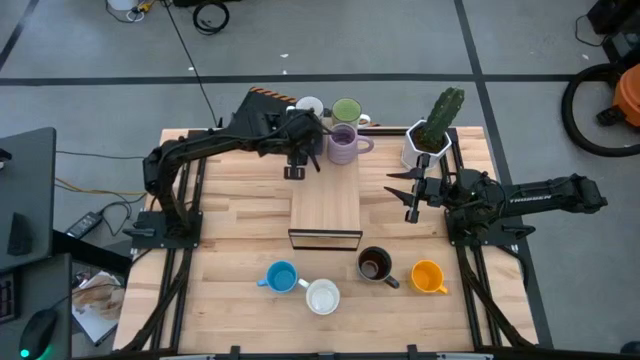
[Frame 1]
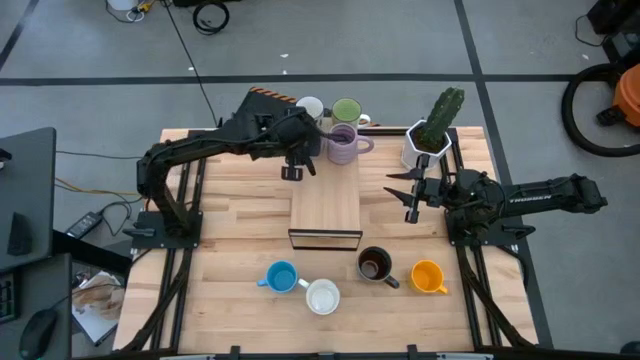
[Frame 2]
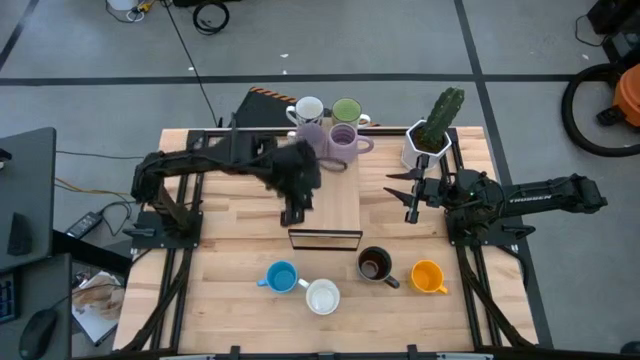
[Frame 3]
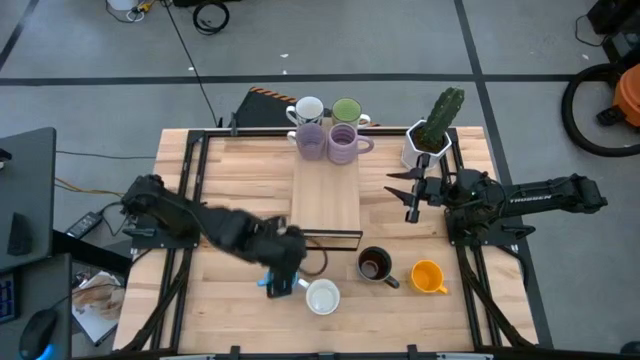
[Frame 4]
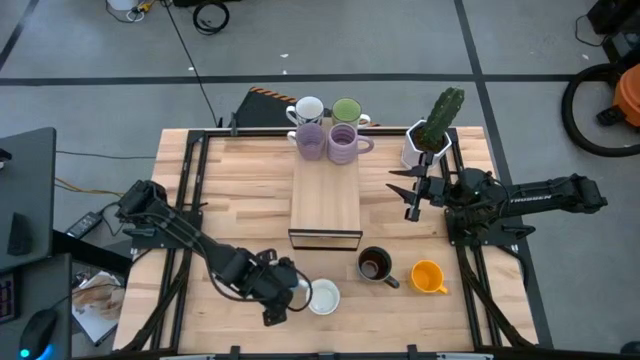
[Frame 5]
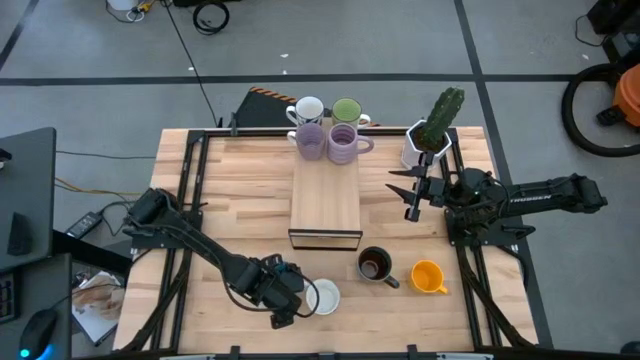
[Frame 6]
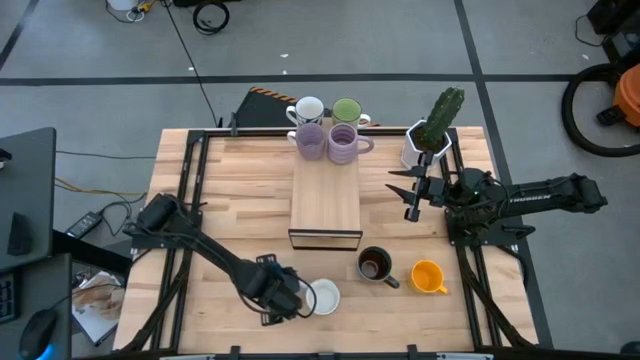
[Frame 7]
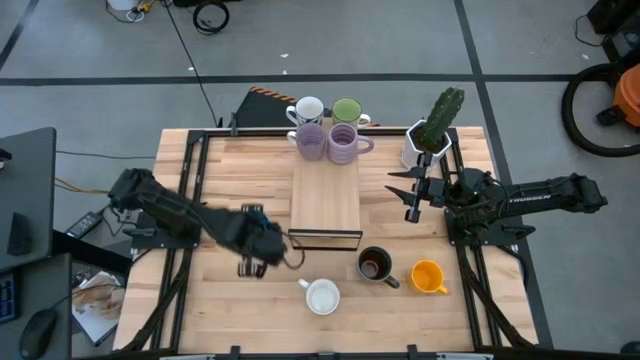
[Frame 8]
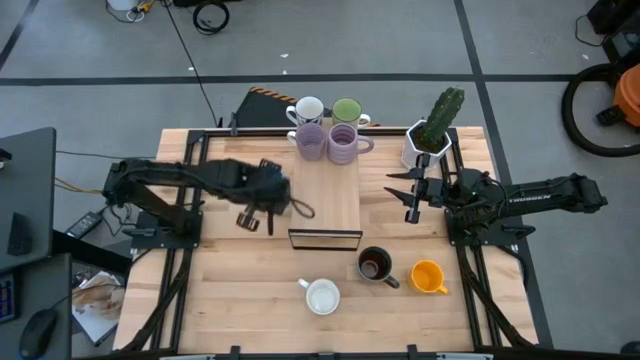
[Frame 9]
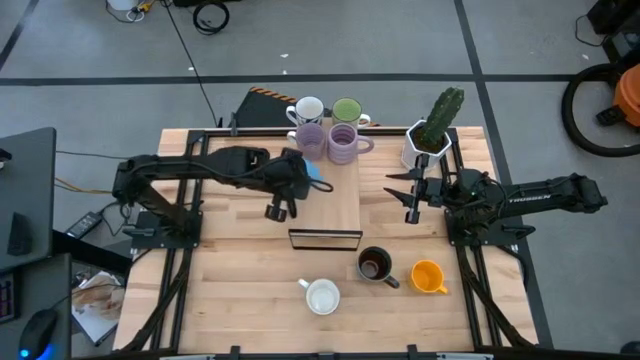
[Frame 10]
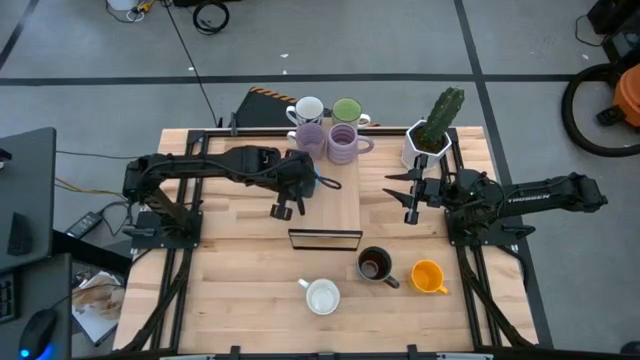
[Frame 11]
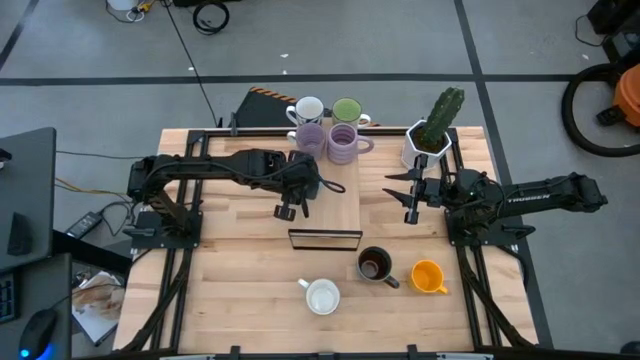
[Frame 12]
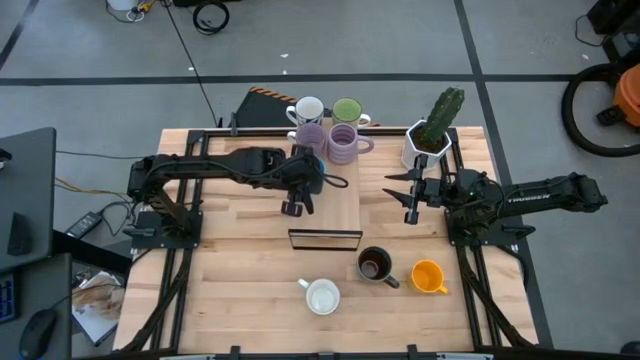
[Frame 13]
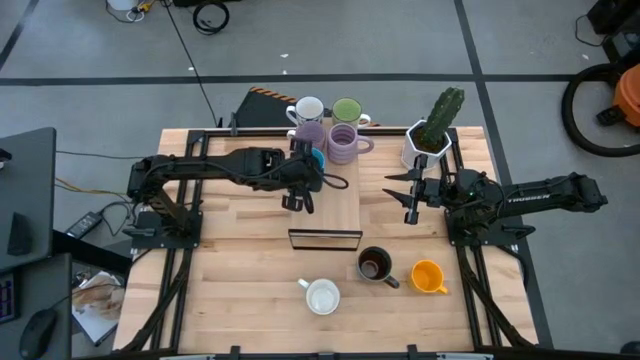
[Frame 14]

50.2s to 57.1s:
Task: Place coffee mugs
Put the blue mug on the shelf

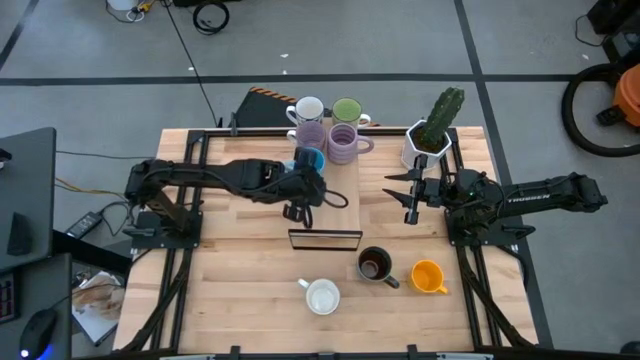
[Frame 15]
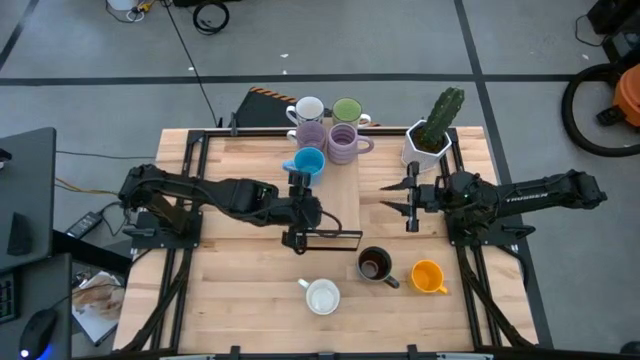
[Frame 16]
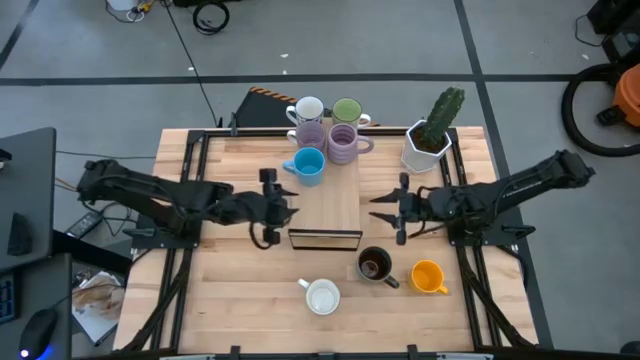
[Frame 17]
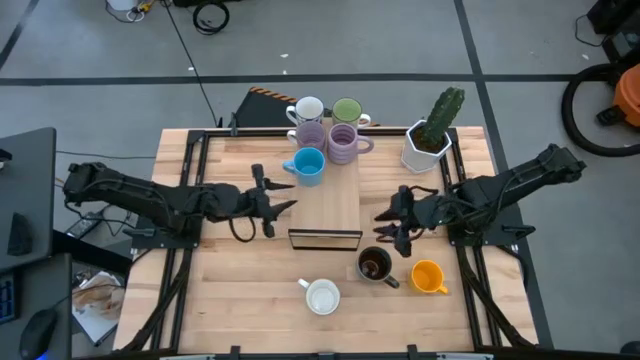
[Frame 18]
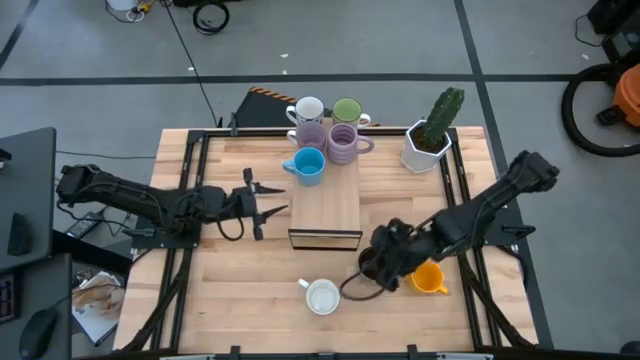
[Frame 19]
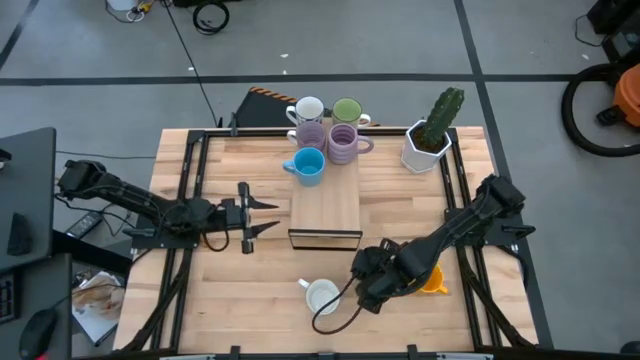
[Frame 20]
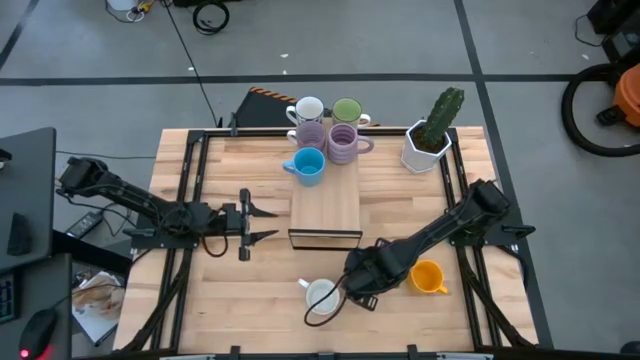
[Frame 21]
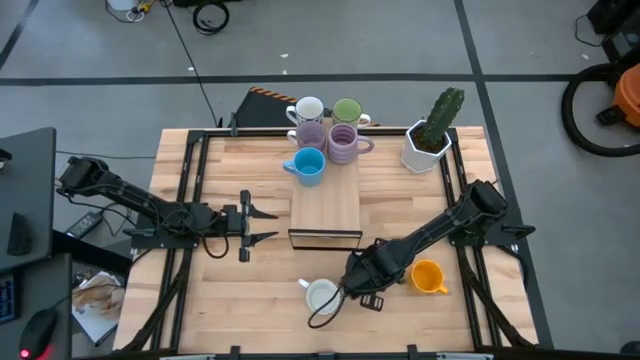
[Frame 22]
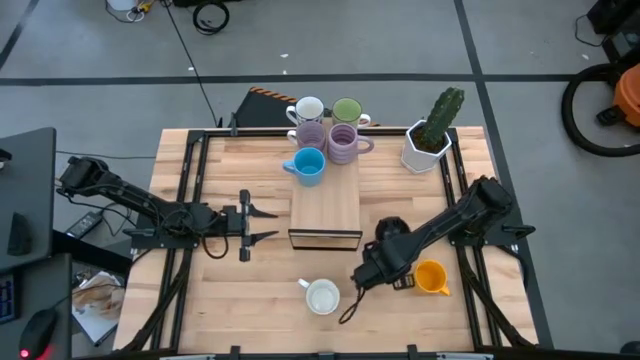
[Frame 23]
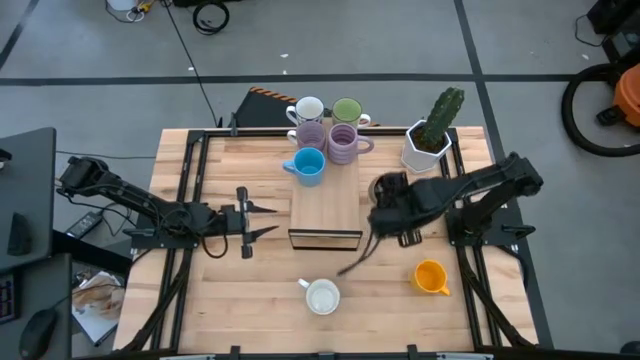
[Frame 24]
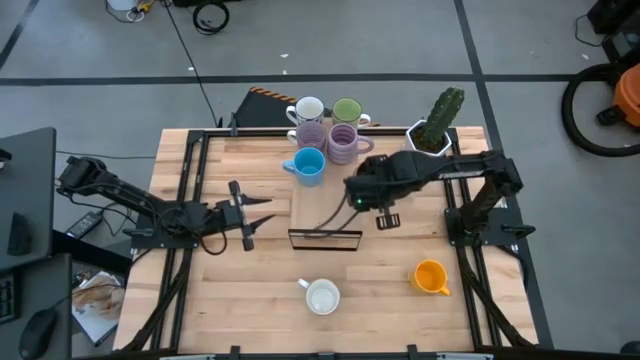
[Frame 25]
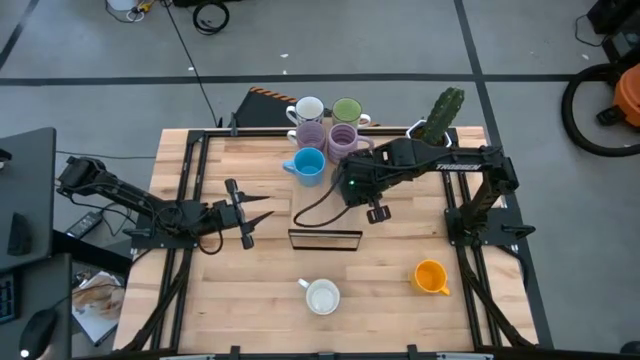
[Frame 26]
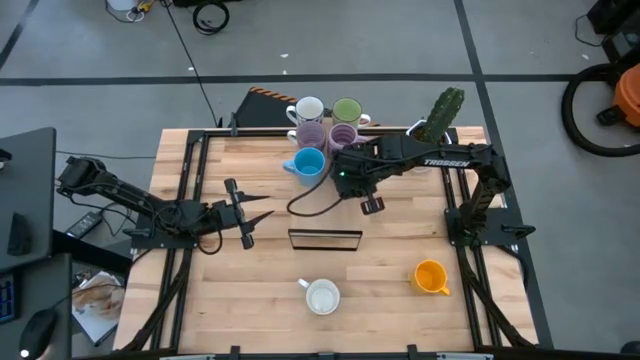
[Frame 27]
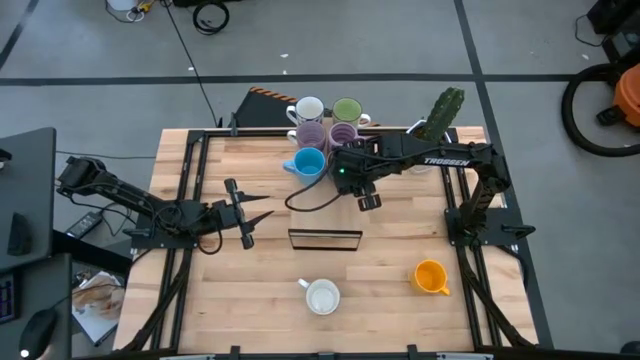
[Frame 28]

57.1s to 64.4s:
Put the blue patterned mug on the shelf

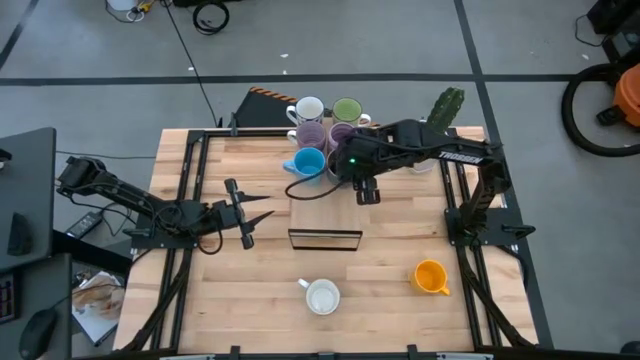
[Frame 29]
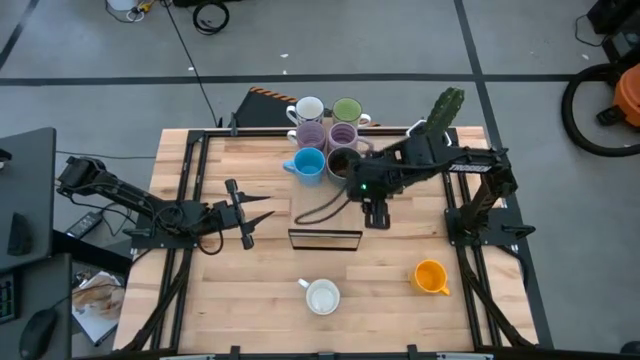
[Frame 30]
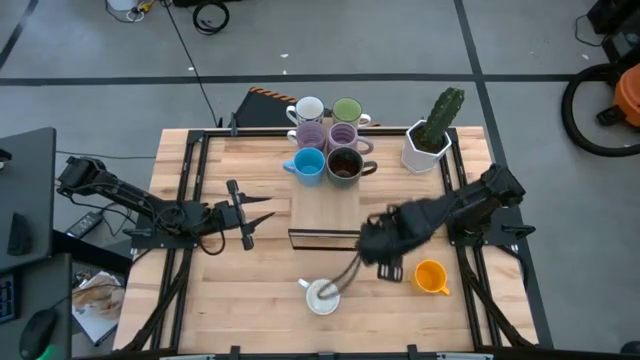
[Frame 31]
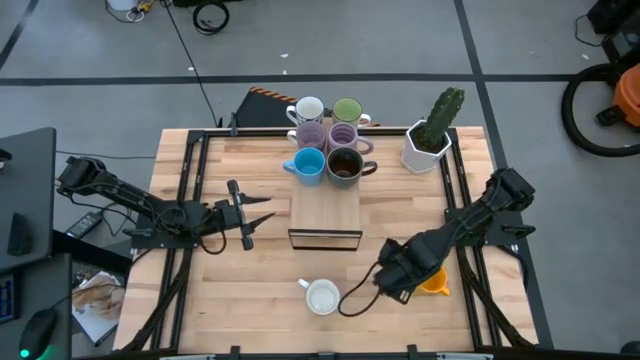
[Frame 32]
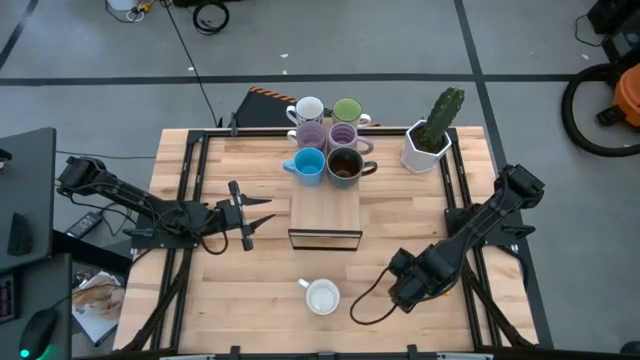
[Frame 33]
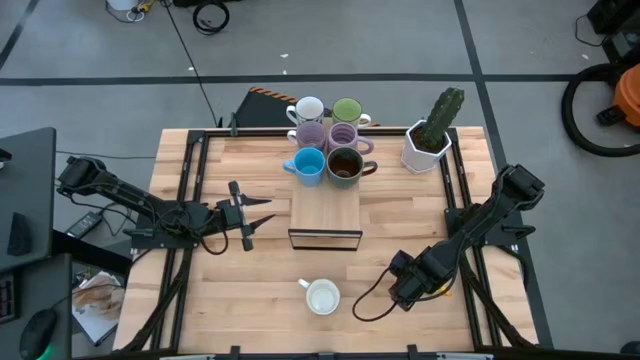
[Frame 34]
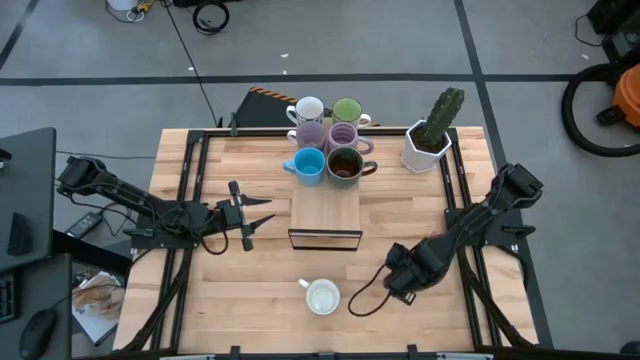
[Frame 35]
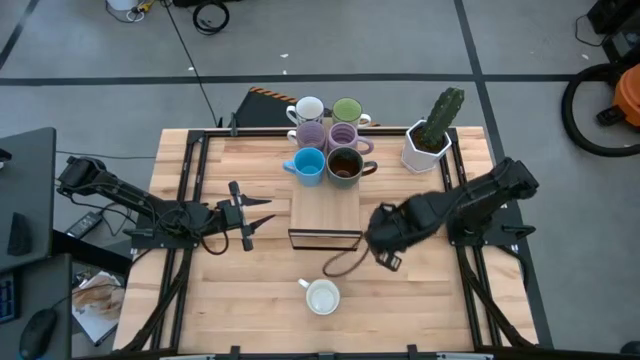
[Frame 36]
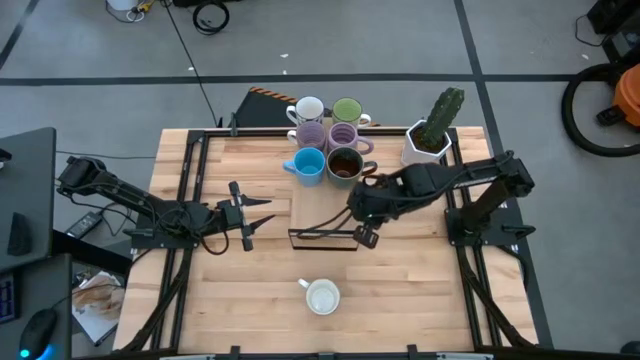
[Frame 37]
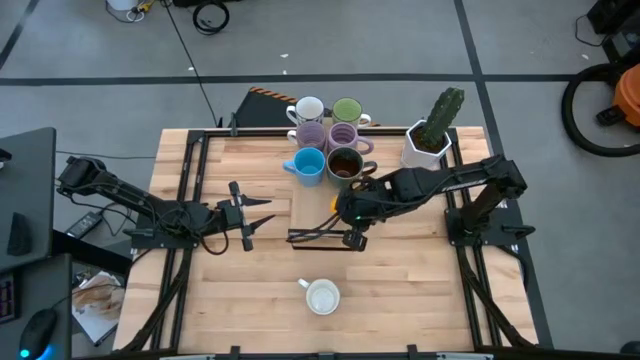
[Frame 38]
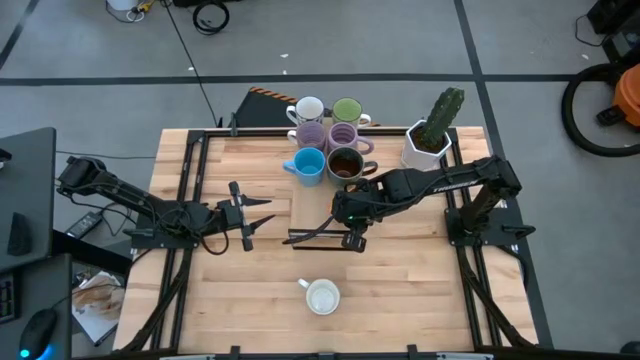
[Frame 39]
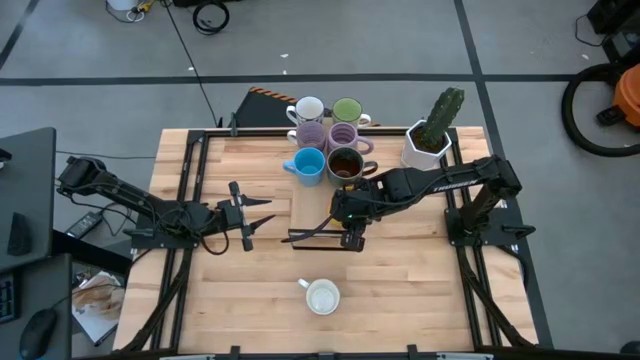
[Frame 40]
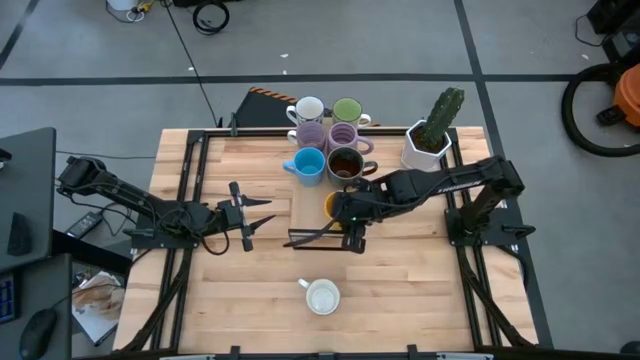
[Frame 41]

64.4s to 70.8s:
Put the yellow mug on the shelf

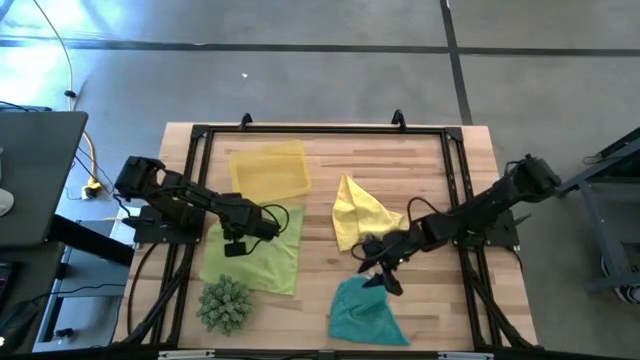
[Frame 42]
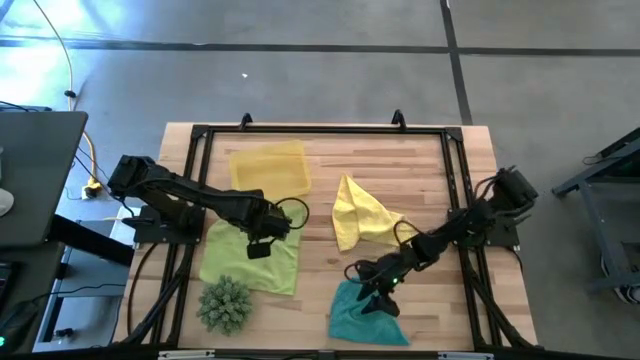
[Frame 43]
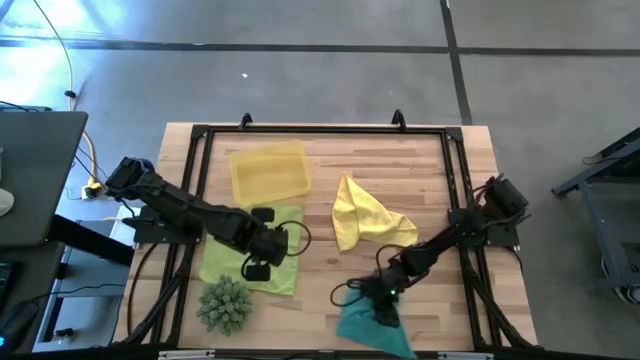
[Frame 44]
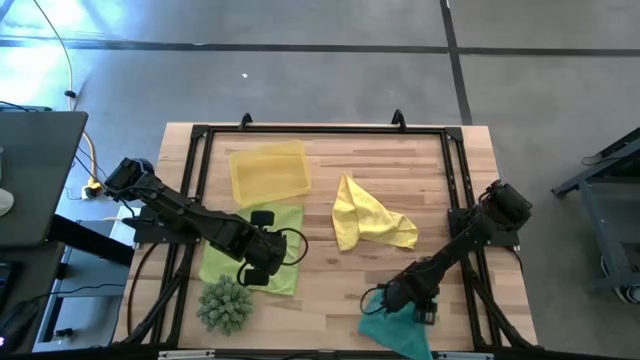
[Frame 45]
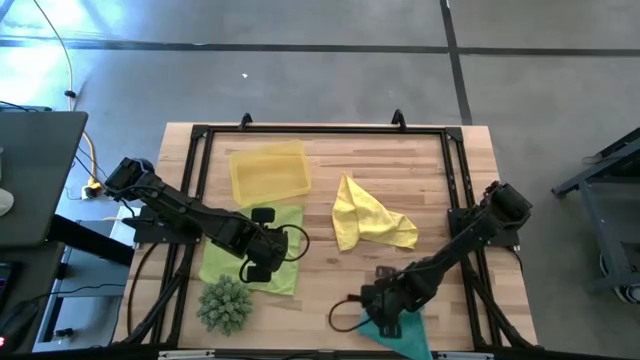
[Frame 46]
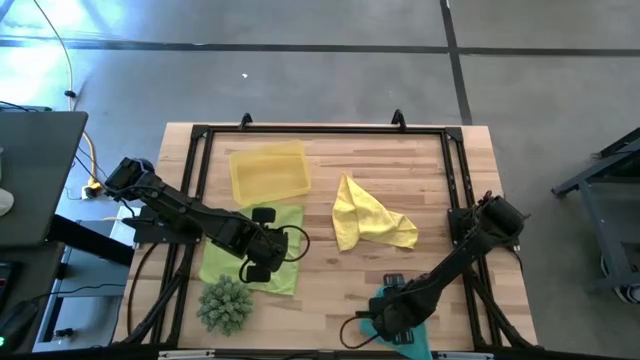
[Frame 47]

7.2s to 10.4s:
Task: Roll microfiber towels into tight, uniform cylinder then place into a basket
Adjust the blue microfiber towel
